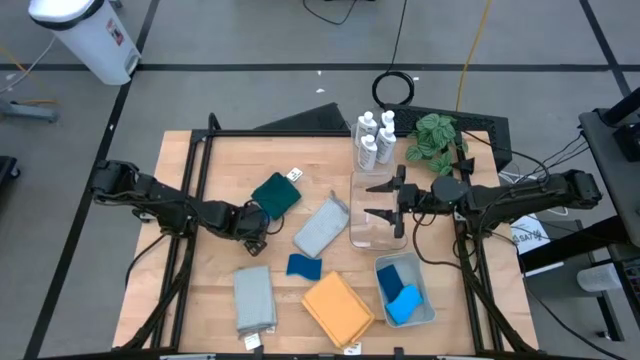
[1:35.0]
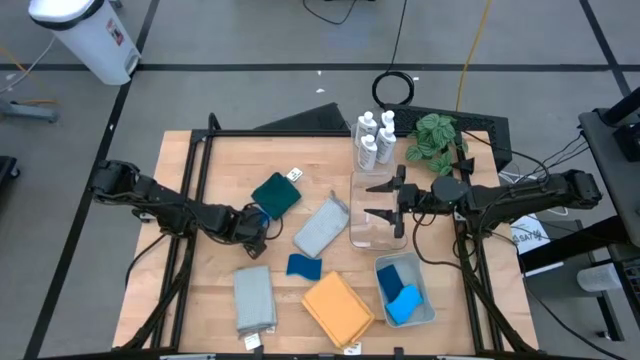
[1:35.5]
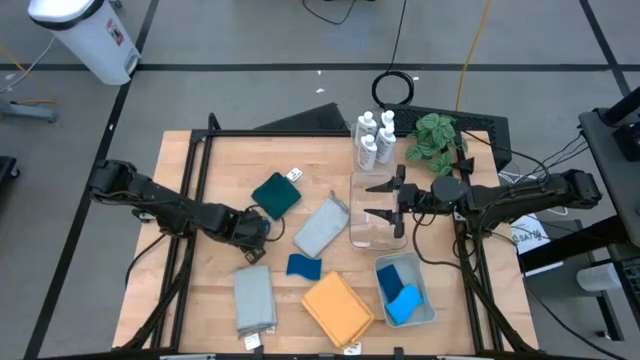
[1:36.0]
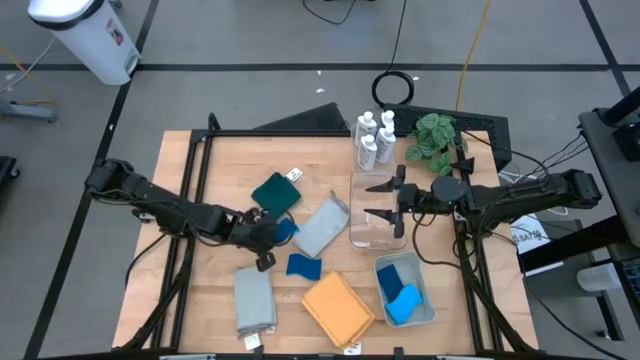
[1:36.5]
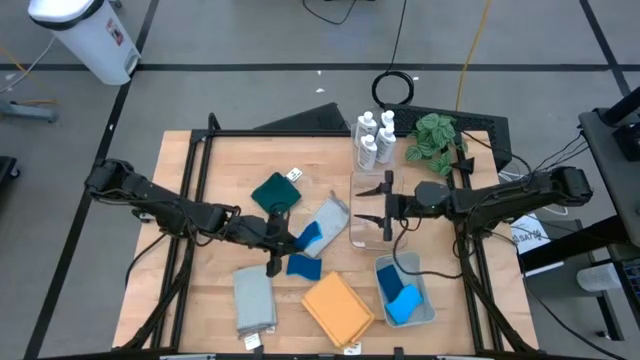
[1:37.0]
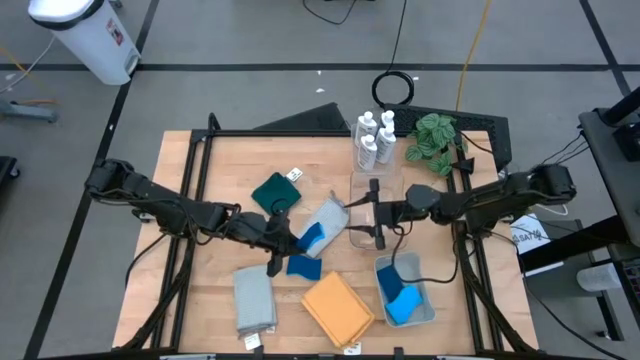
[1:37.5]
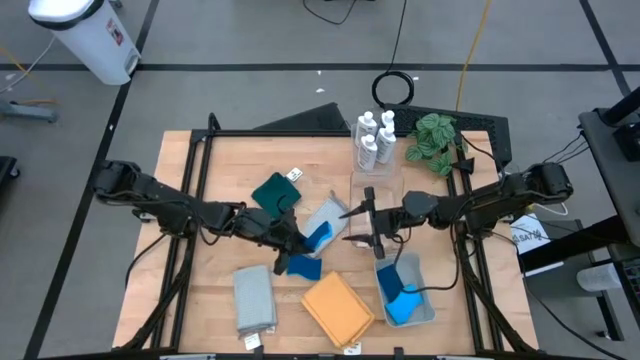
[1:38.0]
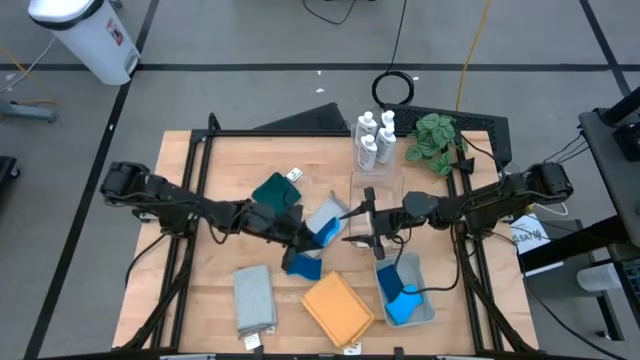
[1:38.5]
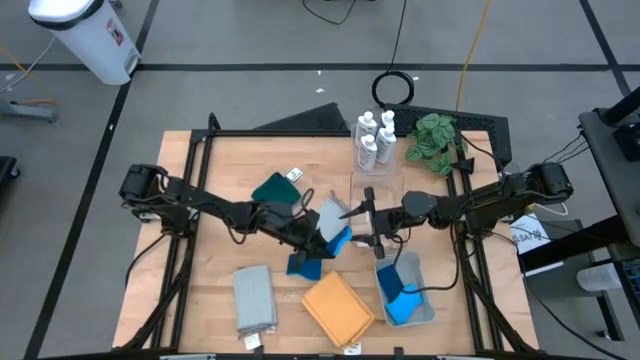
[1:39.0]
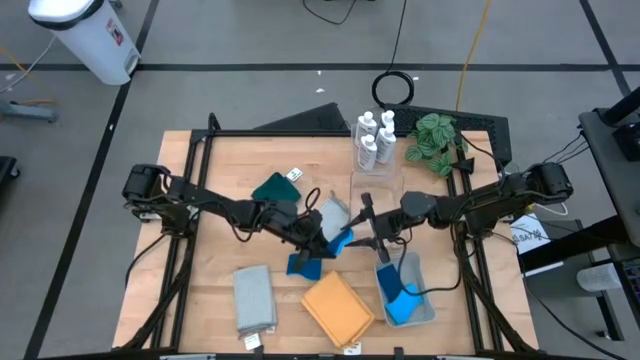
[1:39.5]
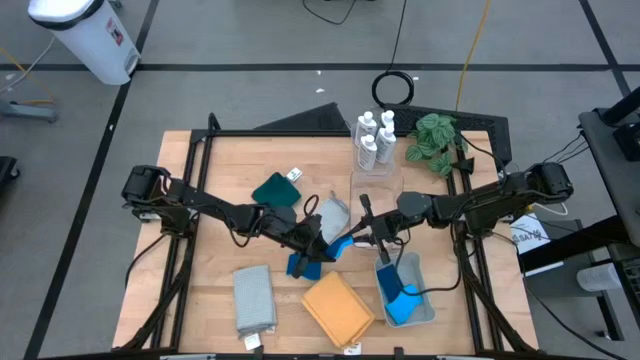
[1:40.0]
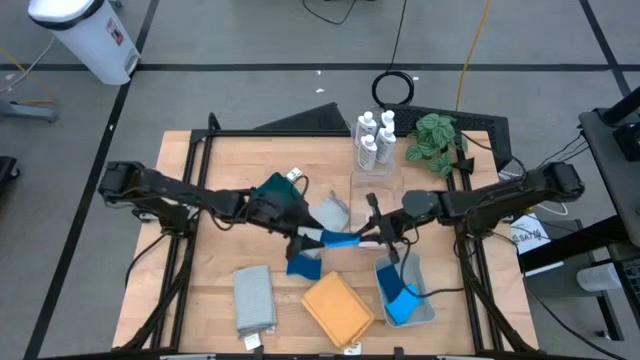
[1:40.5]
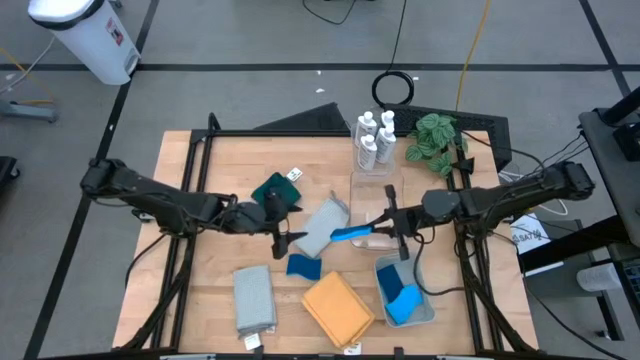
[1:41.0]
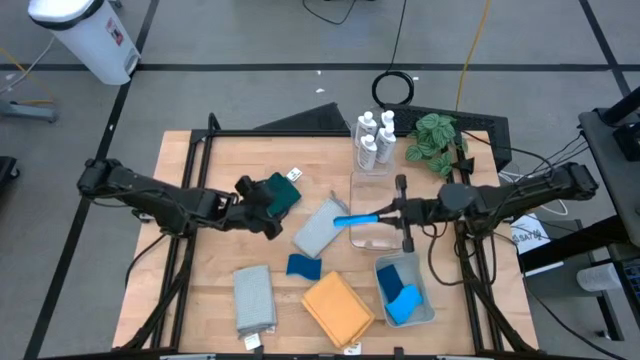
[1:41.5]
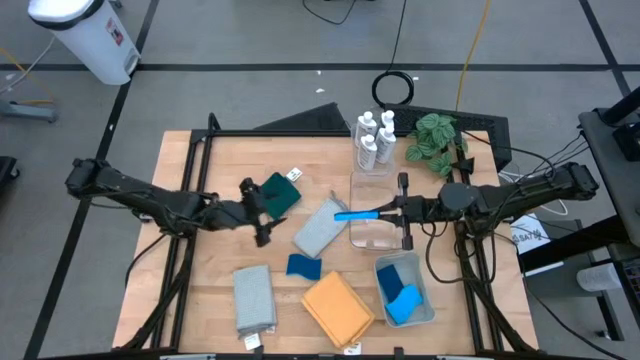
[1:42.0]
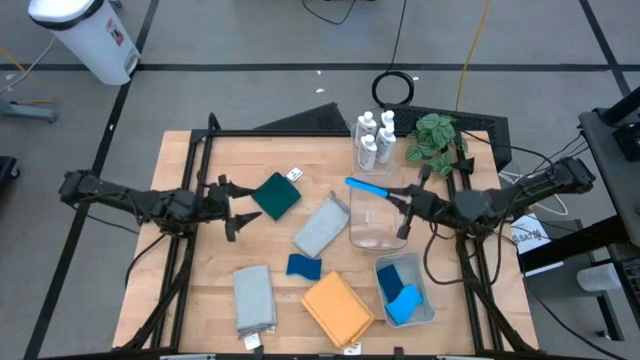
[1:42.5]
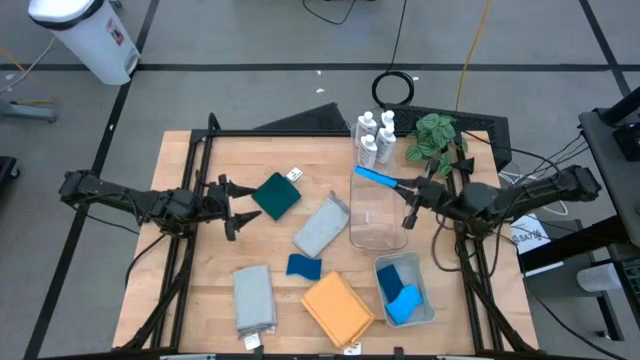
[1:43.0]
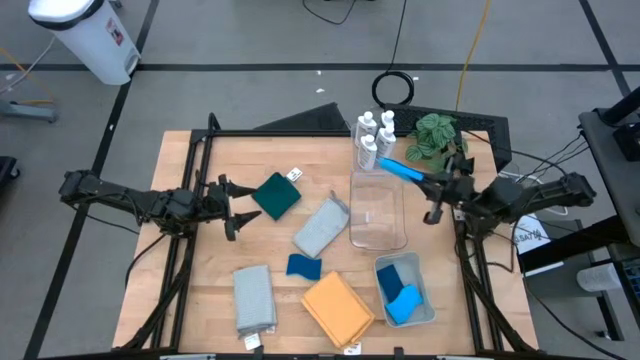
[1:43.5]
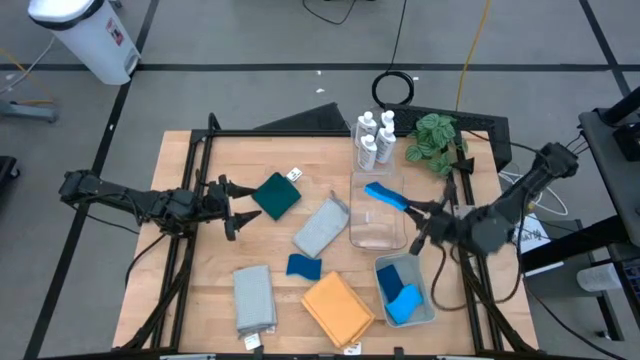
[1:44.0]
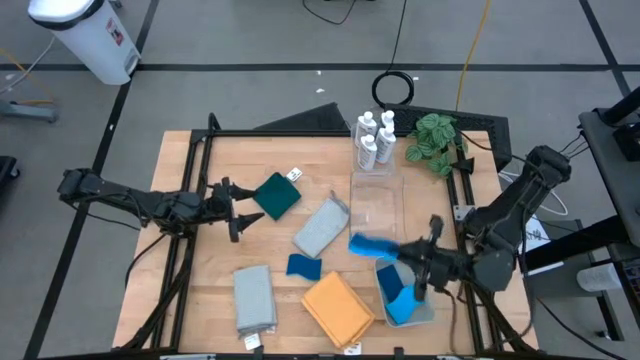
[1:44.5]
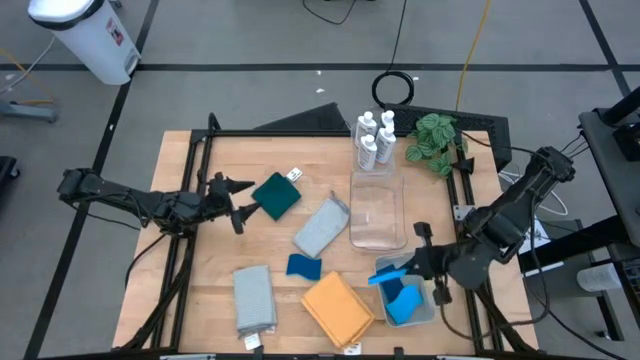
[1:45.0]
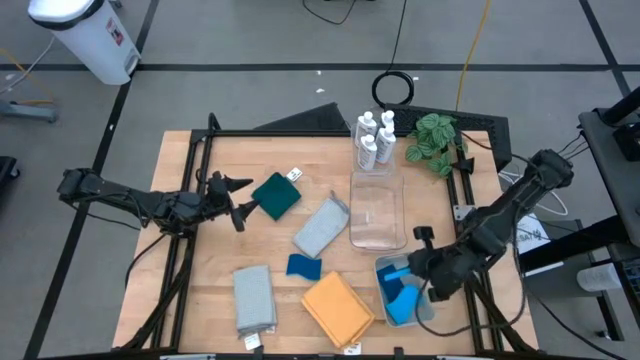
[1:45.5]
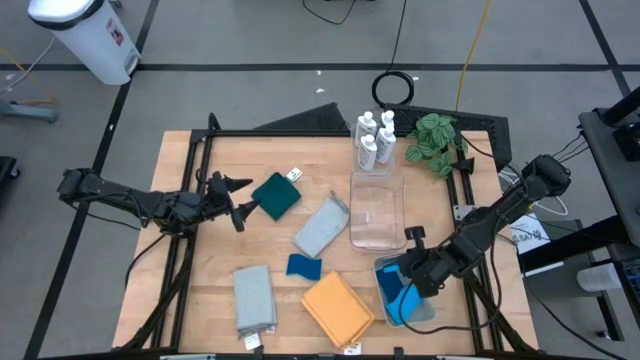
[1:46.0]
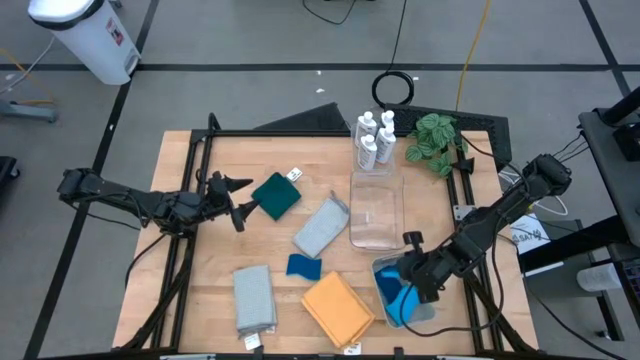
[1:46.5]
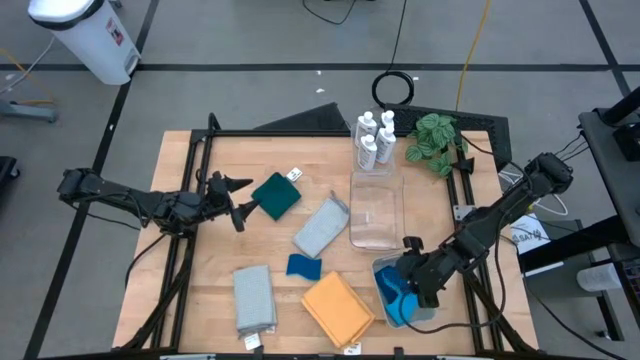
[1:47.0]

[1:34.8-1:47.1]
Task: Pick & Place Kitchen Items
Put the blue sponge into the gray bin

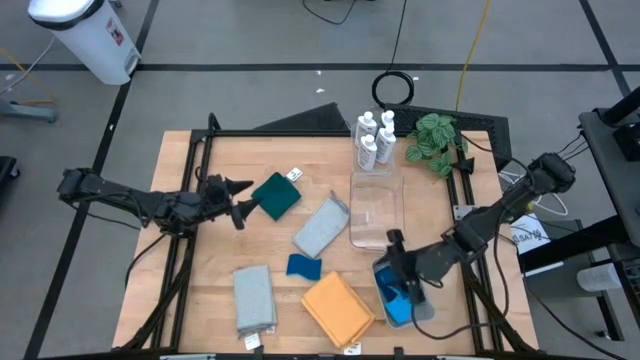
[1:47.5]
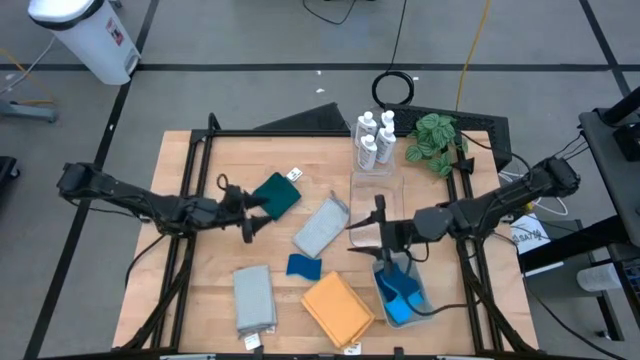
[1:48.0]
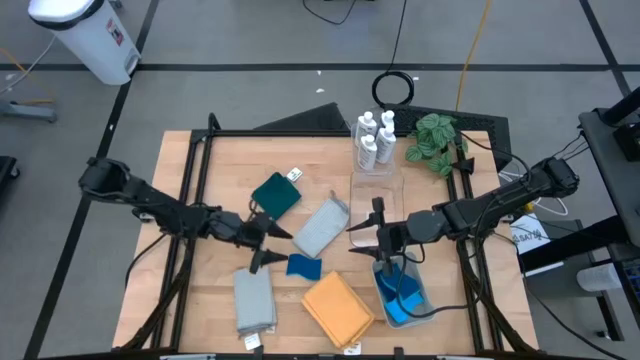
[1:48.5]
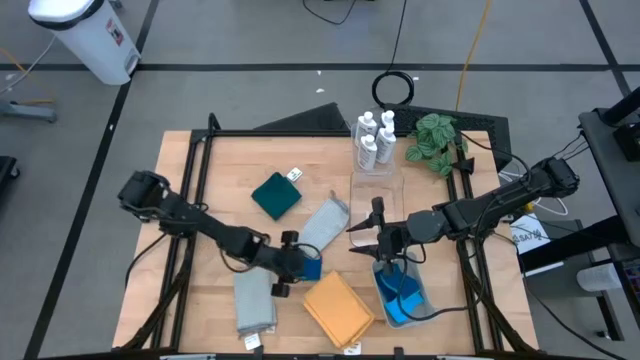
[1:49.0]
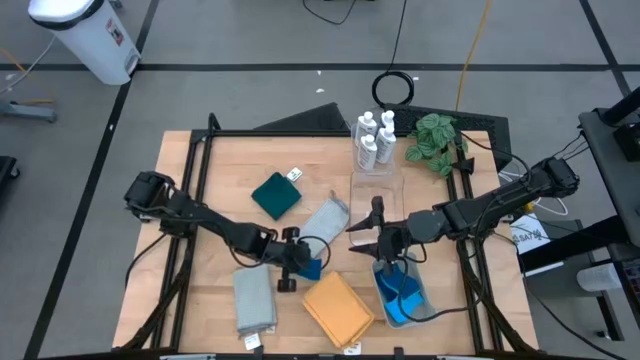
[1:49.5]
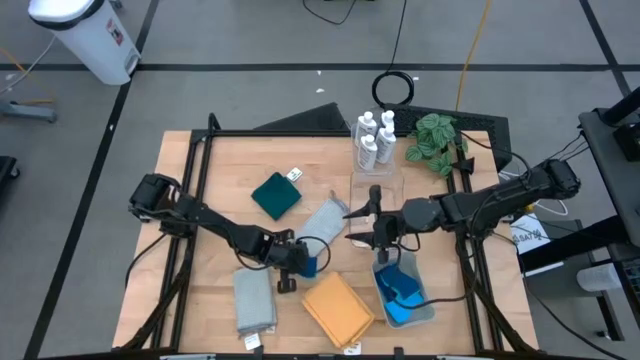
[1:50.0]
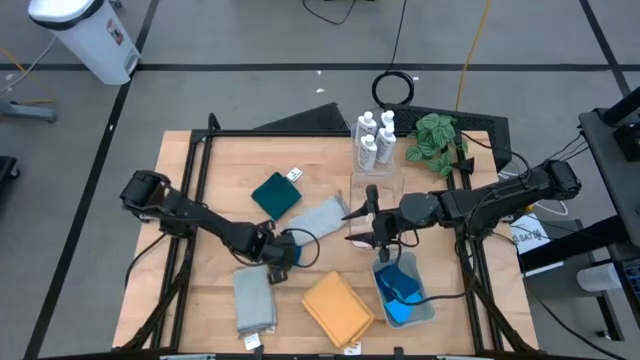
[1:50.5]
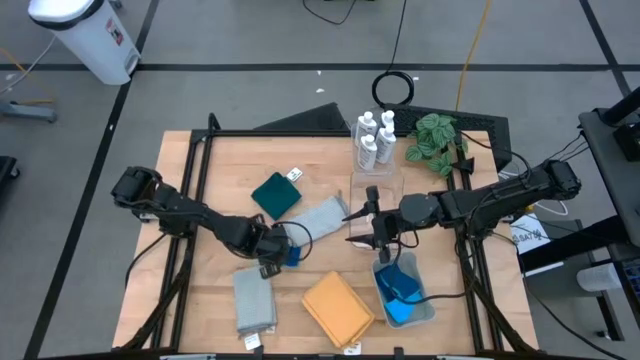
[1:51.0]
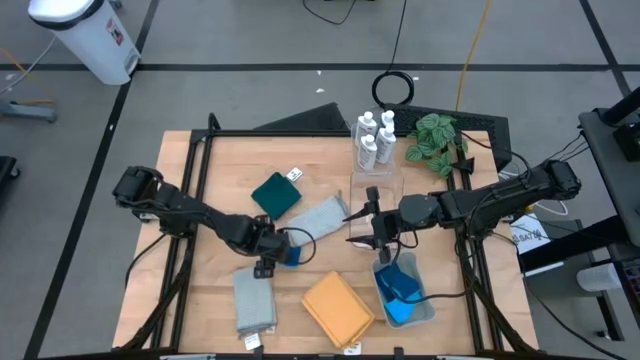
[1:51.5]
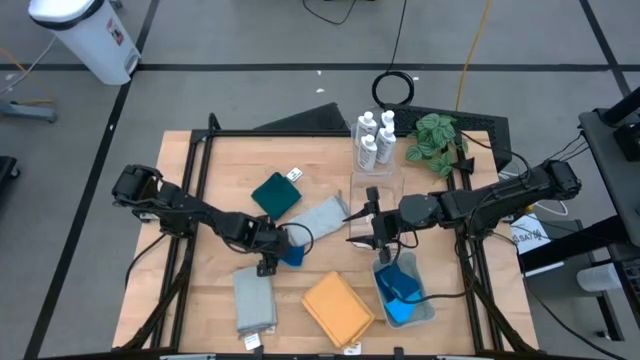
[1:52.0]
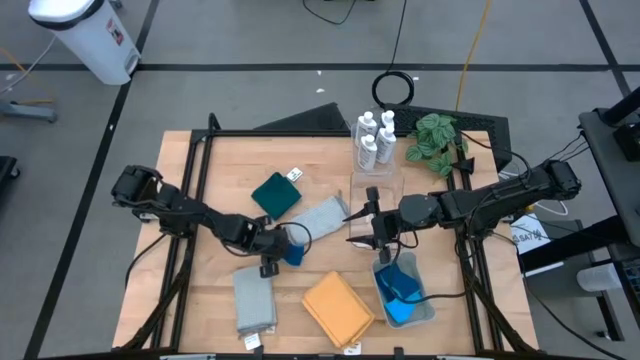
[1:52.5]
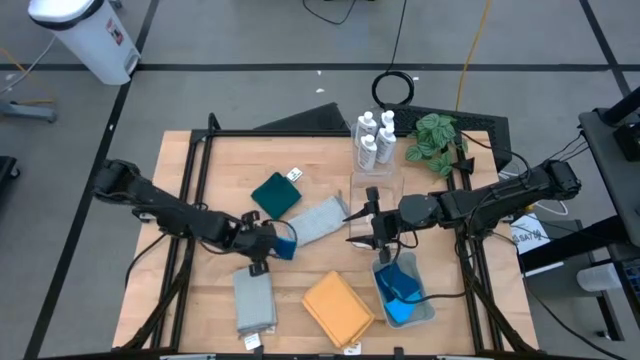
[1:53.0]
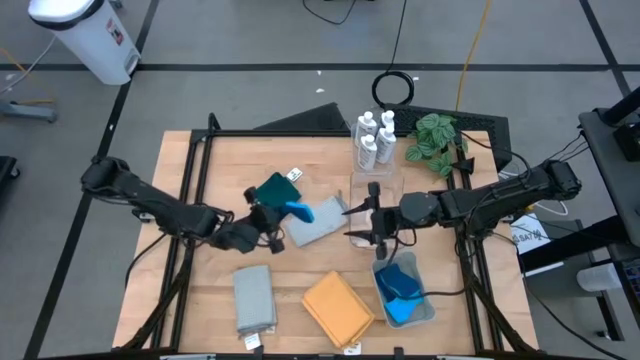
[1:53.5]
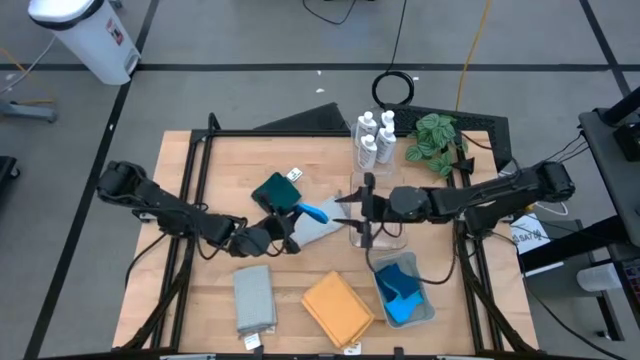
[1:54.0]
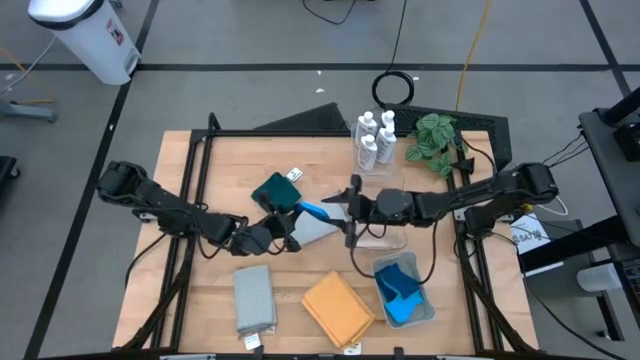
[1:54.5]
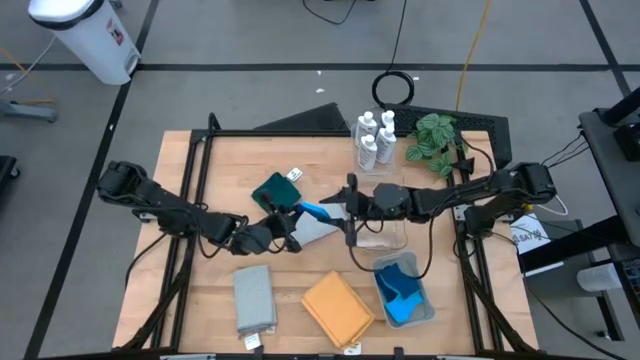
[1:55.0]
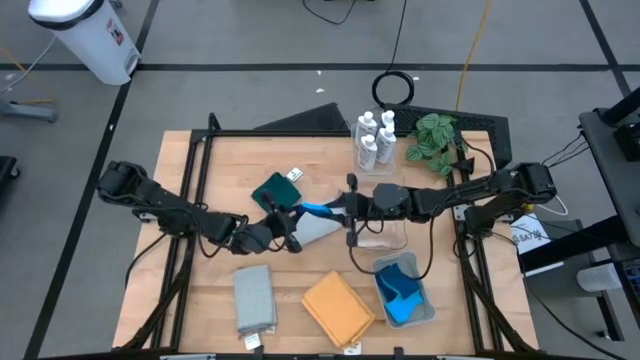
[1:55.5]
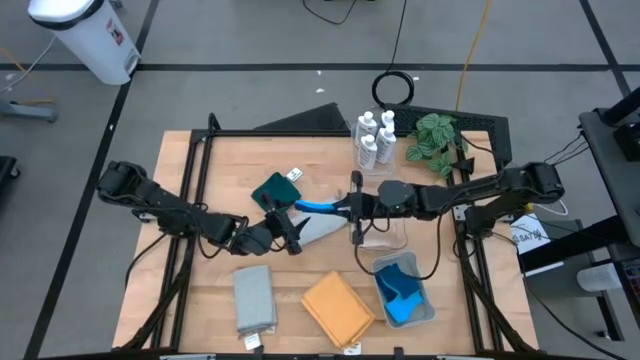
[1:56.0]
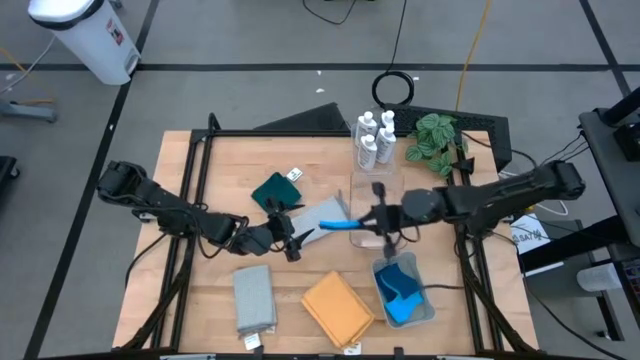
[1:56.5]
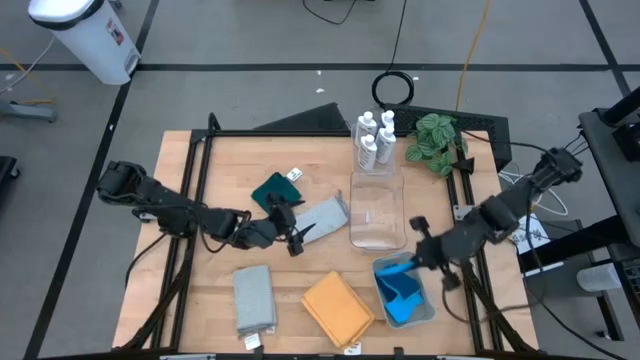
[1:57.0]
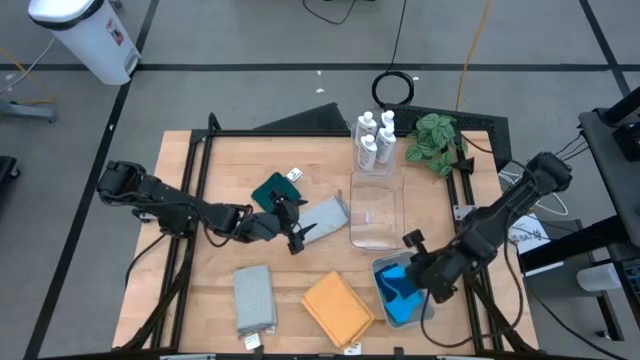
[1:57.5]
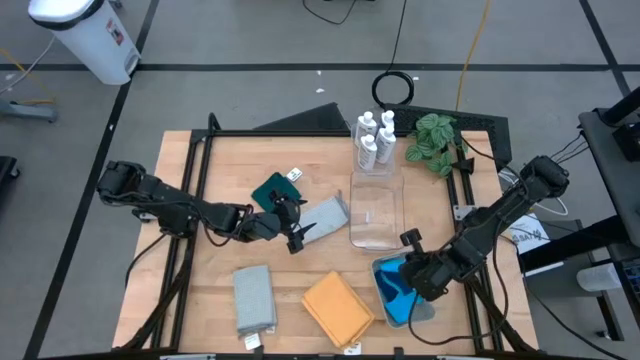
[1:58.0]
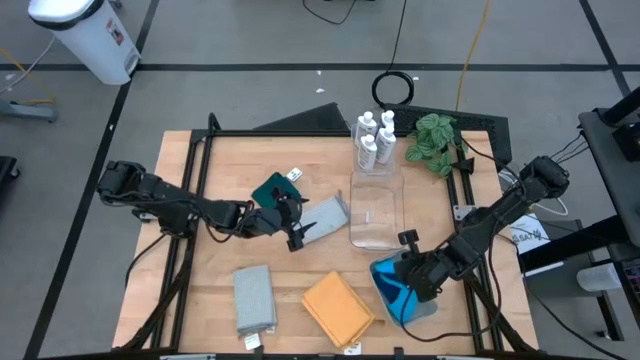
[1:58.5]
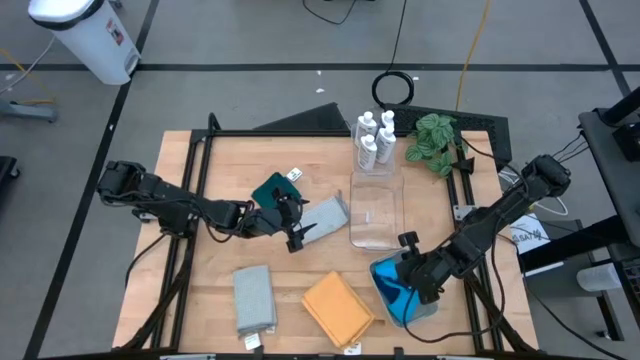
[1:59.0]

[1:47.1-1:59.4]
Put the blue sponge into the gray bin
